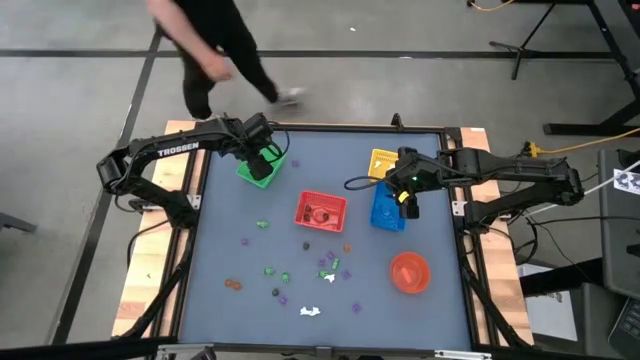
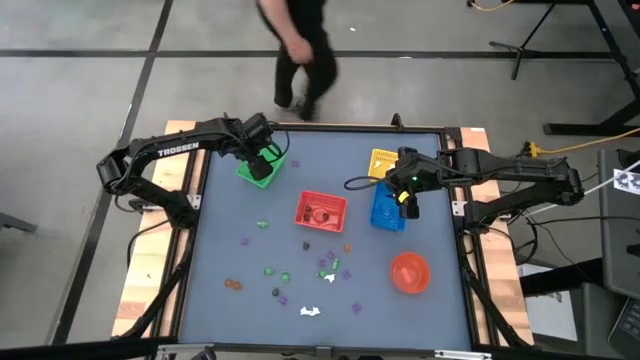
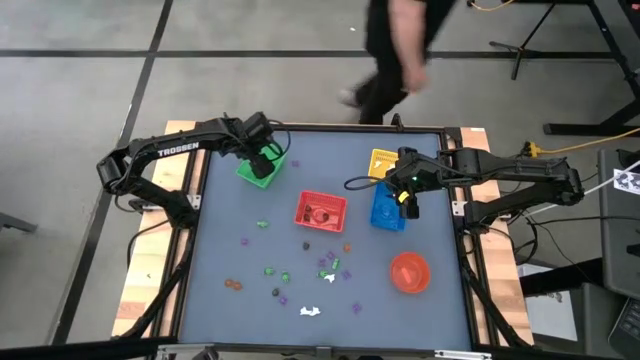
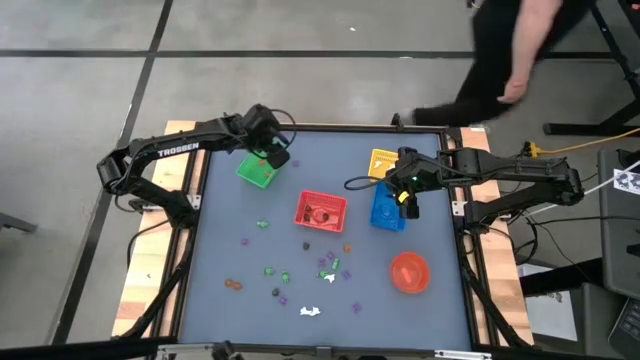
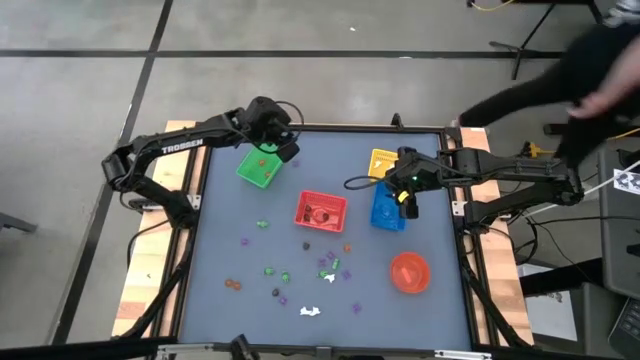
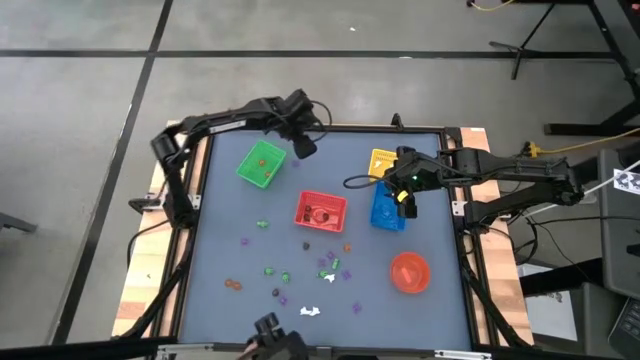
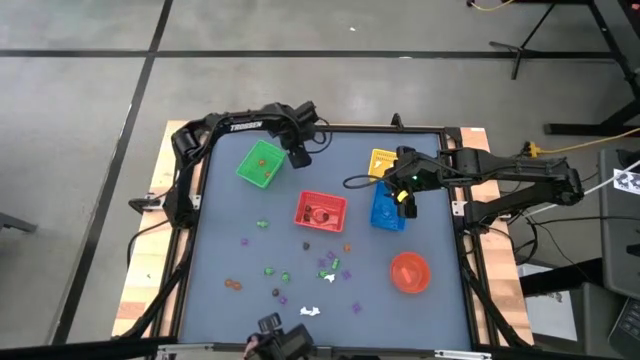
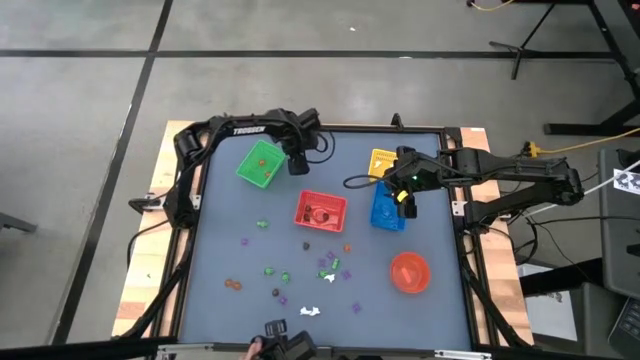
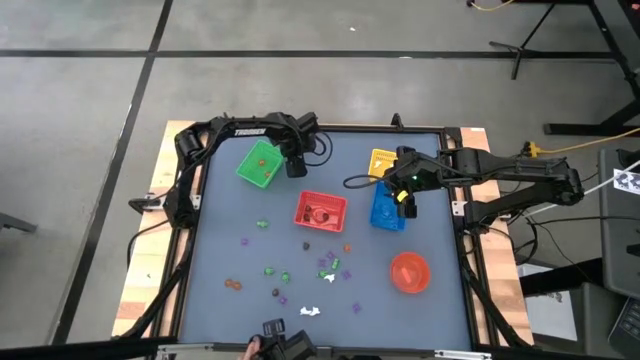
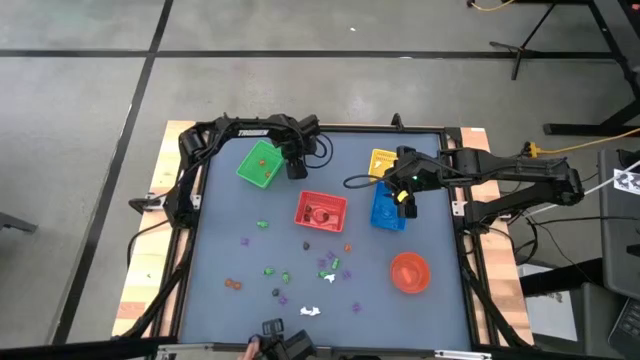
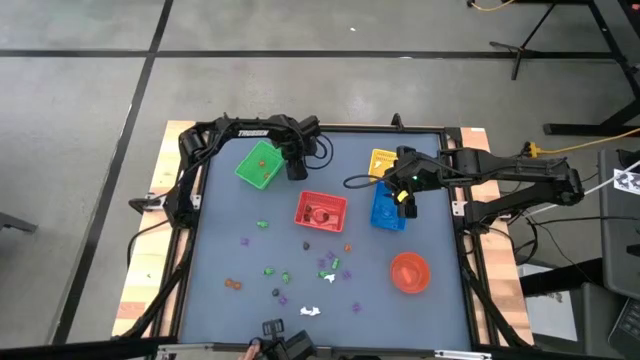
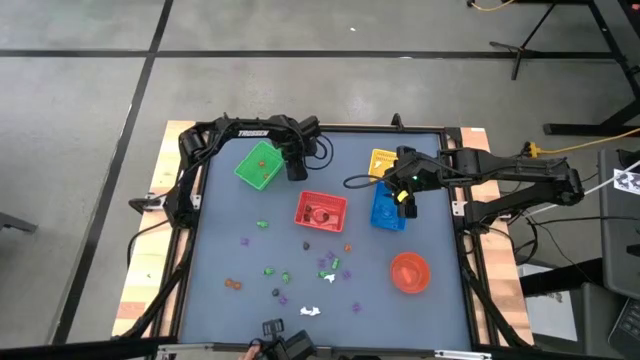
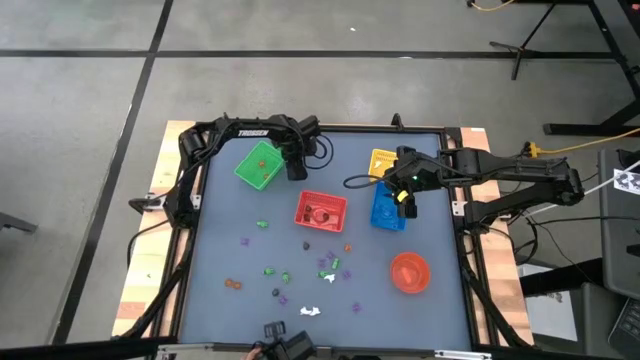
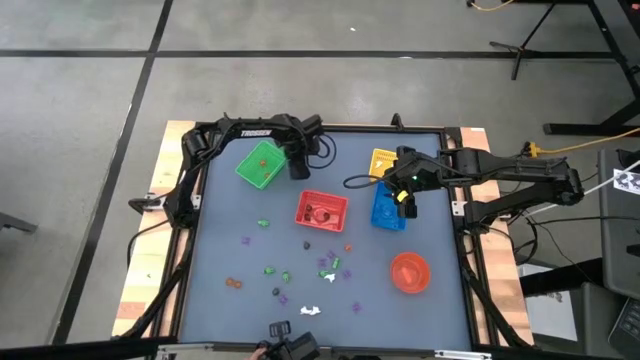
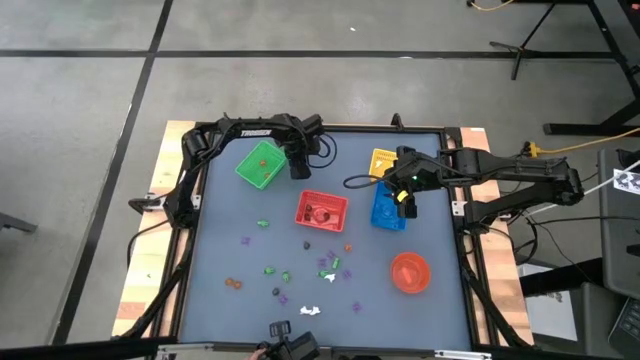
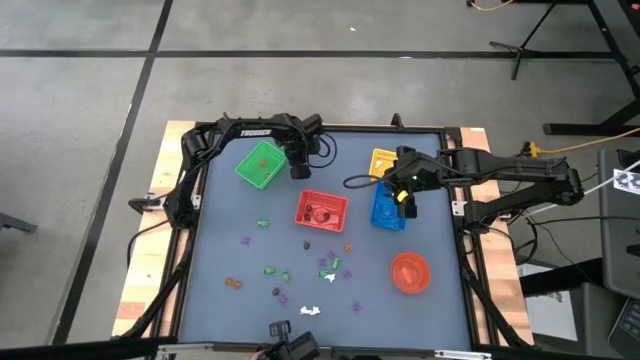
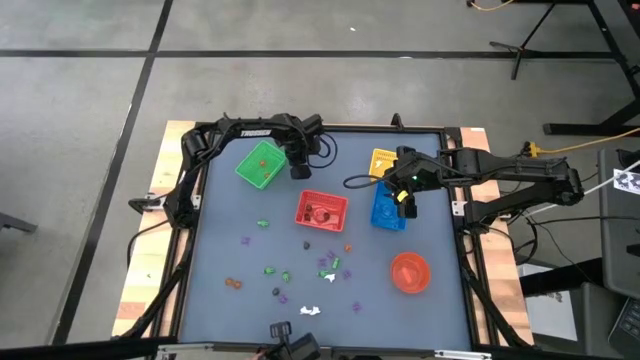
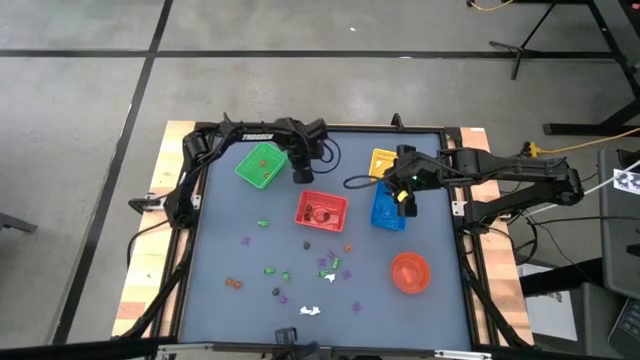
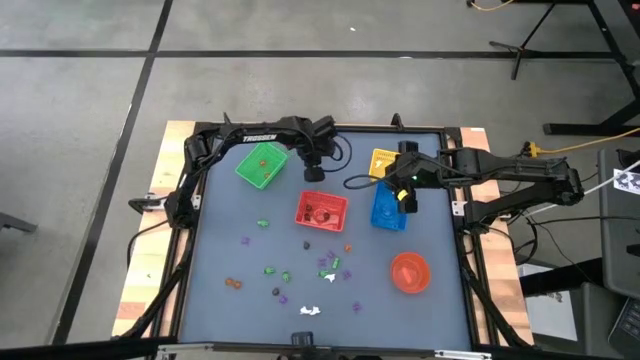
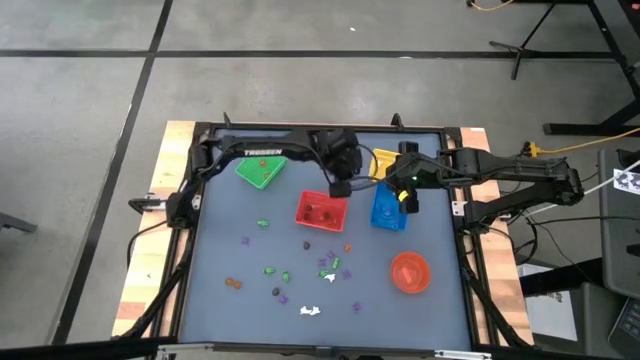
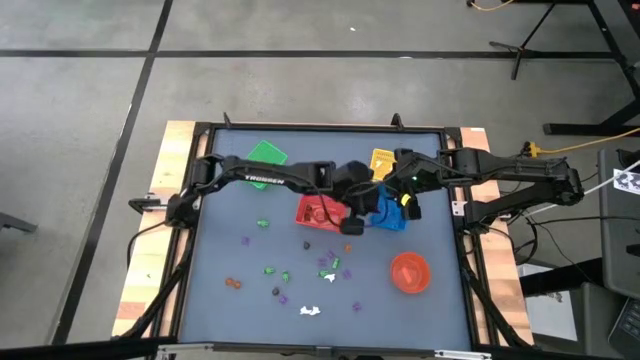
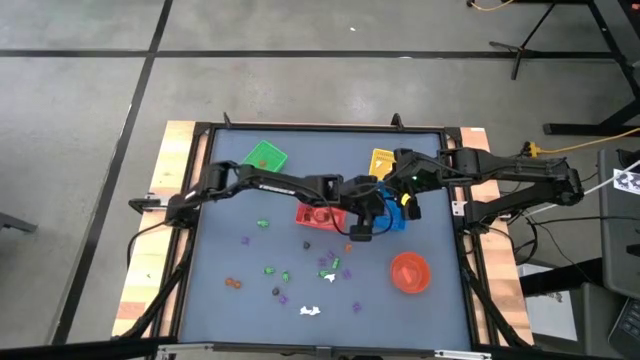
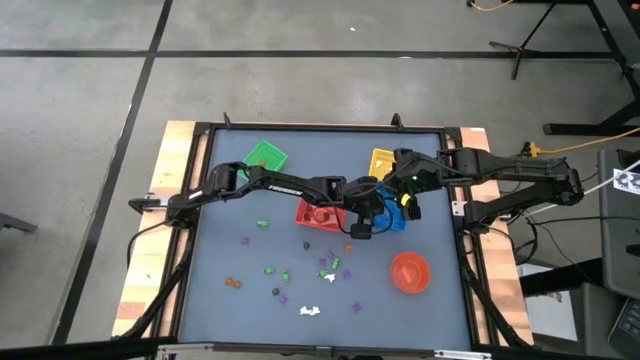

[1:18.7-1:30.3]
Task: Sort Halloween decoration
Put the violet spider toy into the blue bin

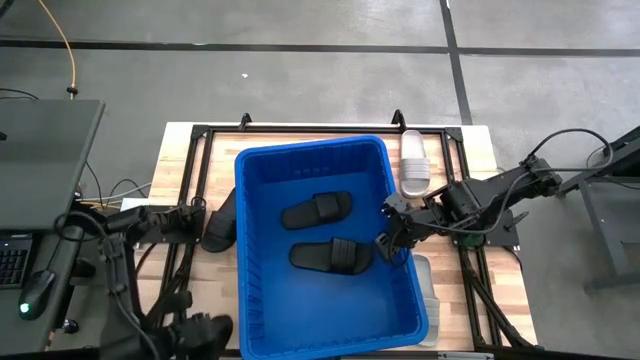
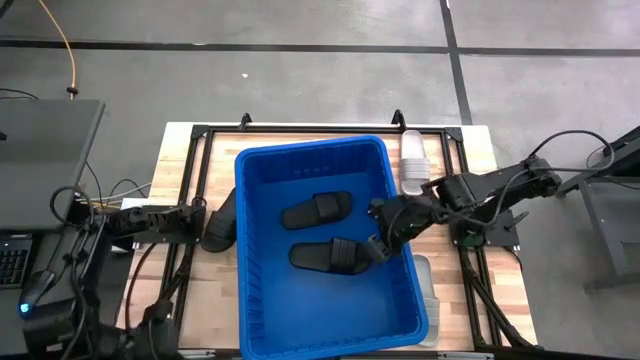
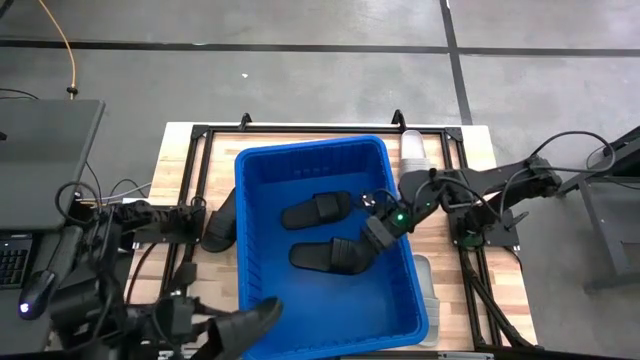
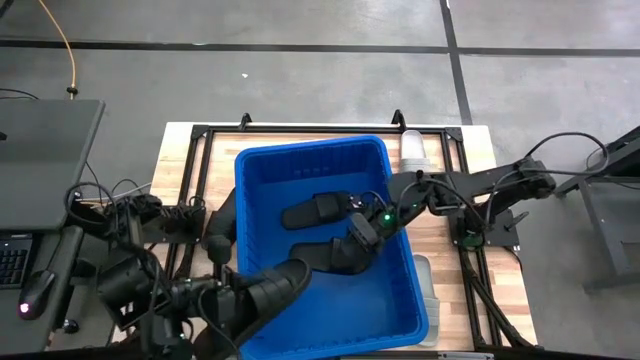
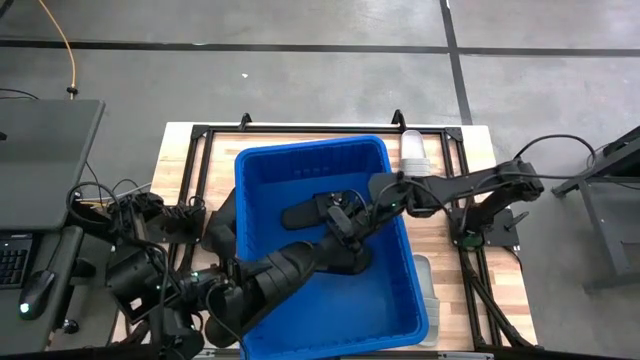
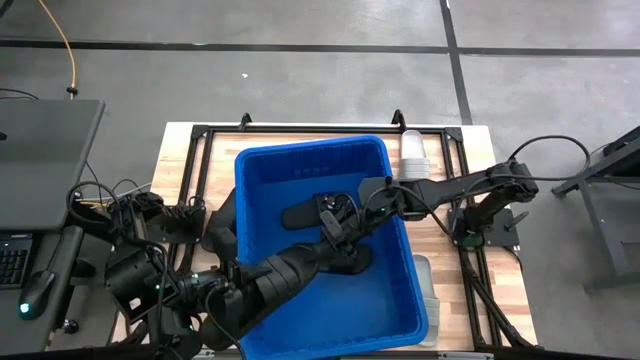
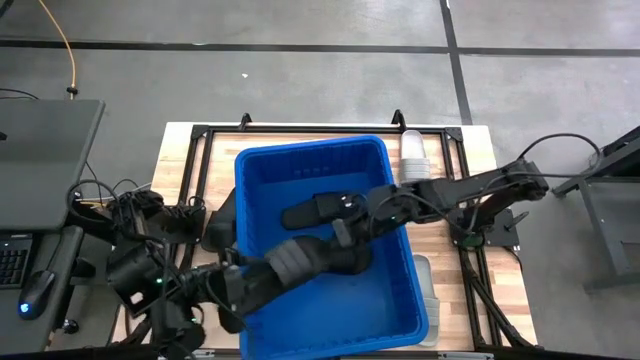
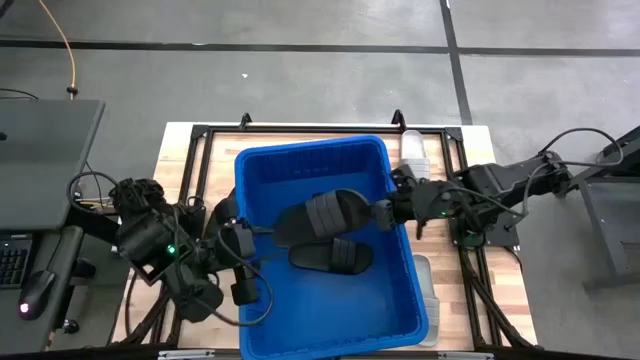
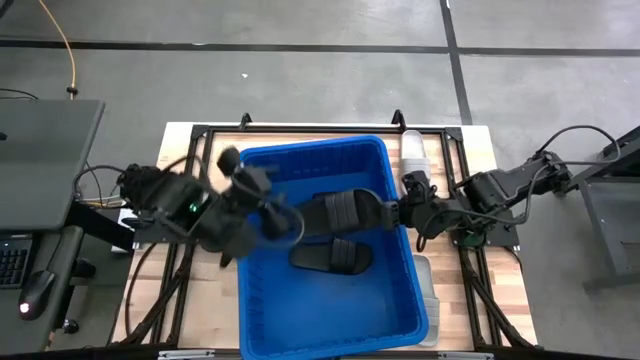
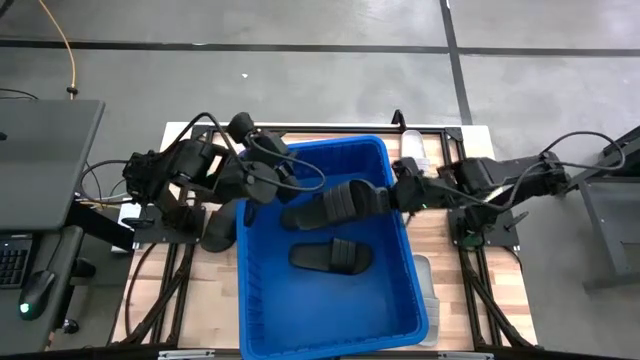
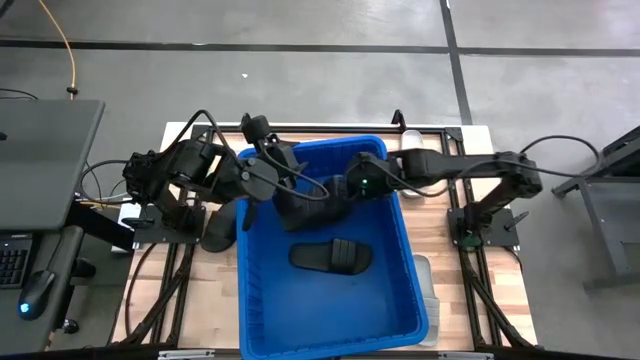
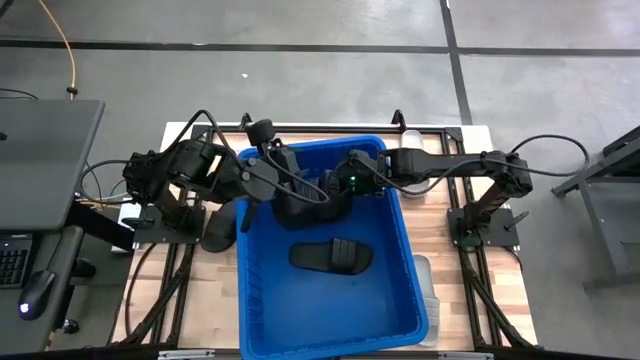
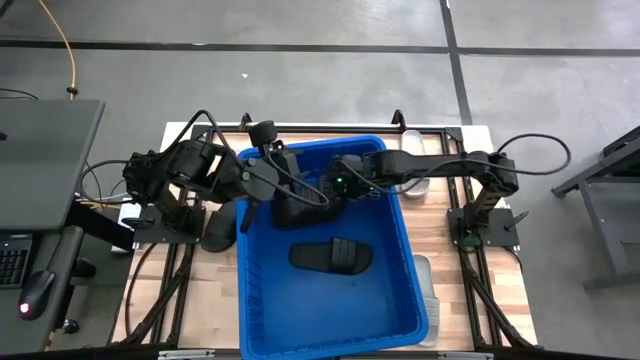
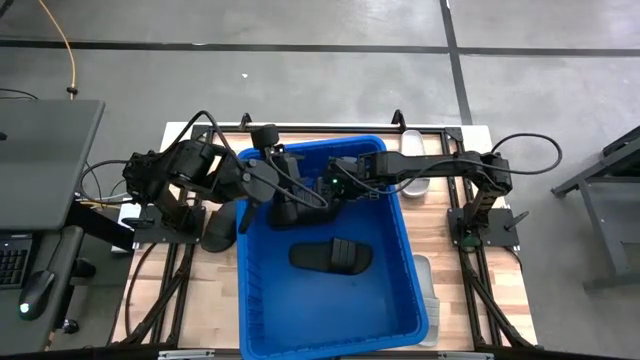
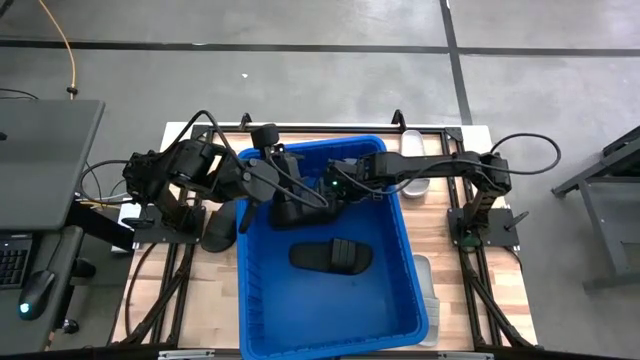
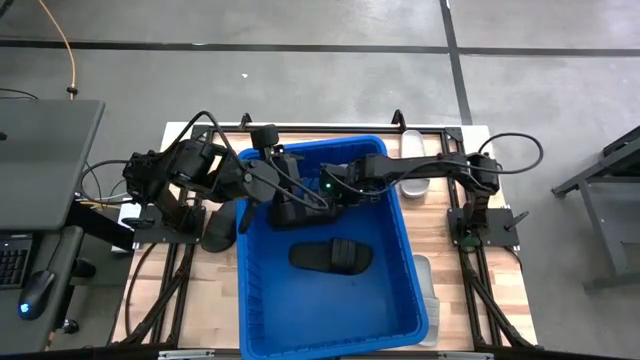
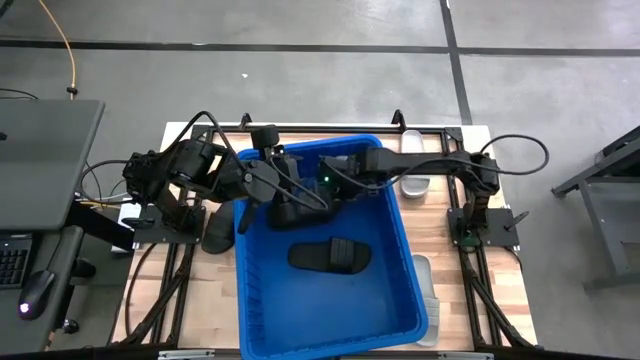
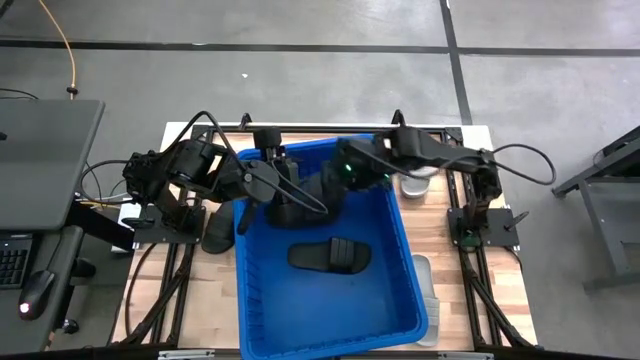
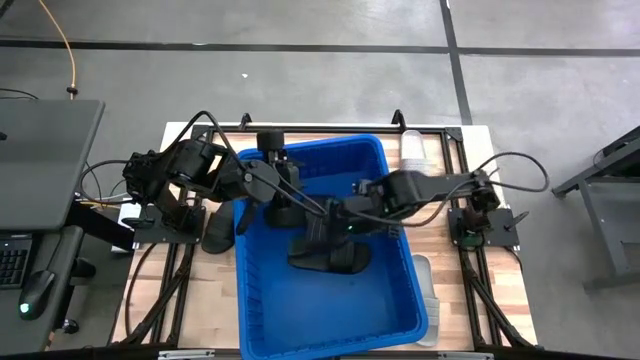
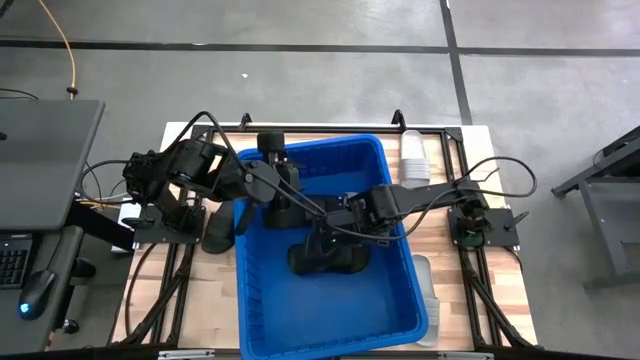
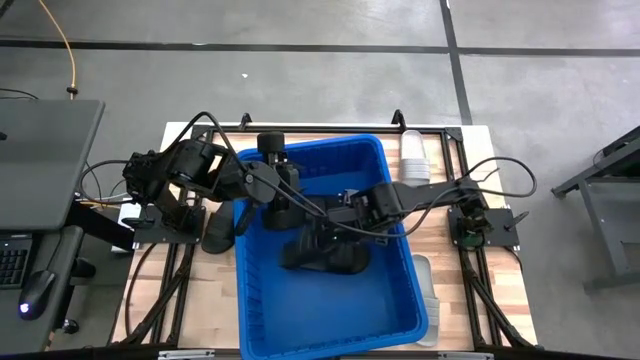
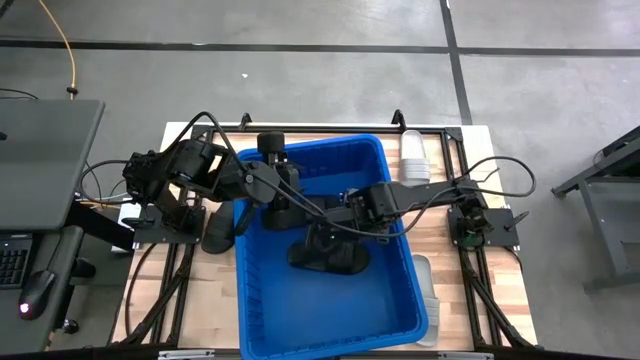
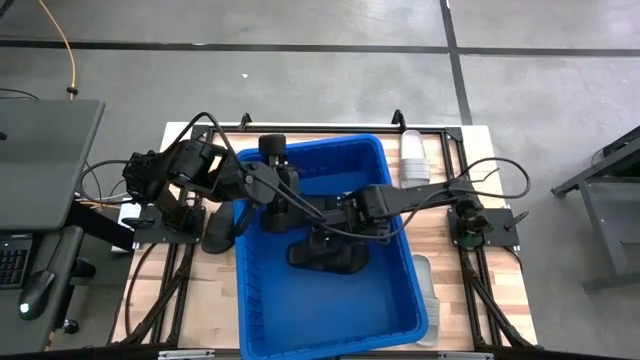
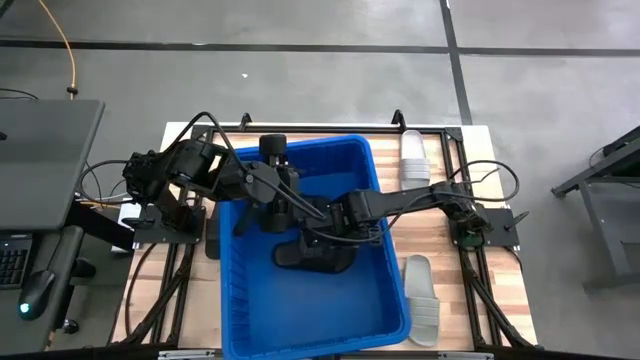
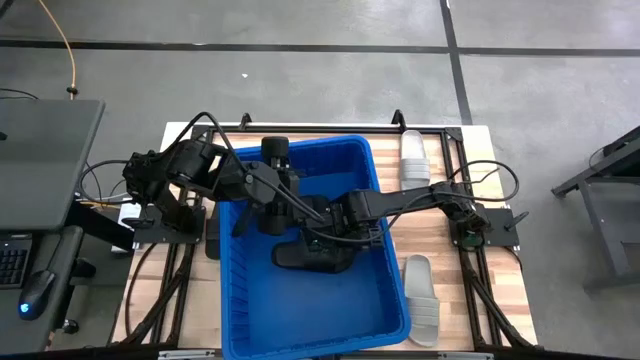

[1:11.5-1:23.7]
Task: Pick and place slides into bin
Put the bottom black slide in the bin
